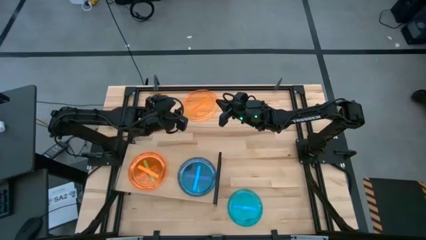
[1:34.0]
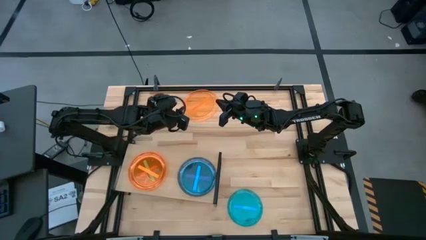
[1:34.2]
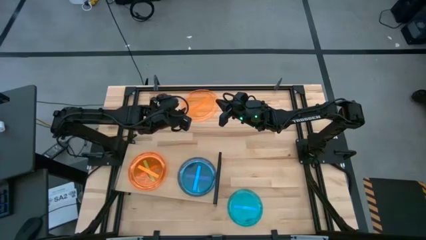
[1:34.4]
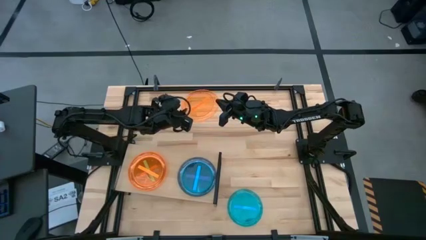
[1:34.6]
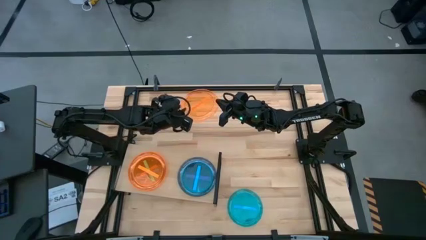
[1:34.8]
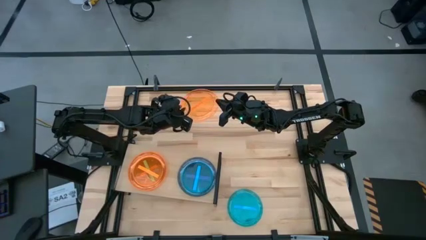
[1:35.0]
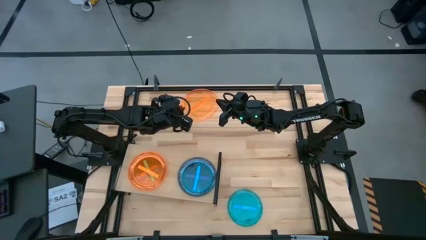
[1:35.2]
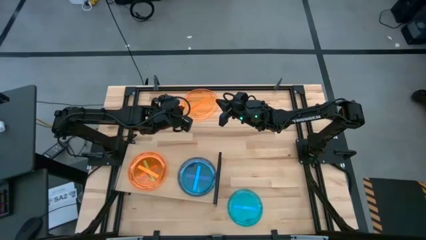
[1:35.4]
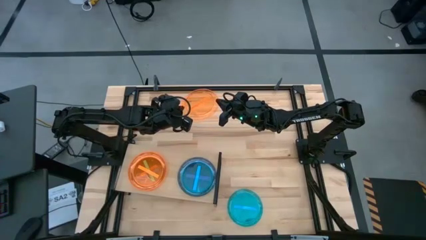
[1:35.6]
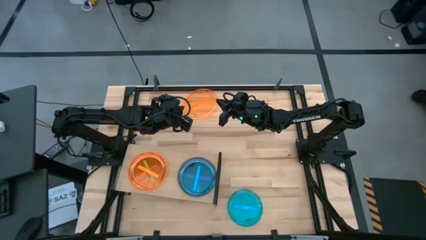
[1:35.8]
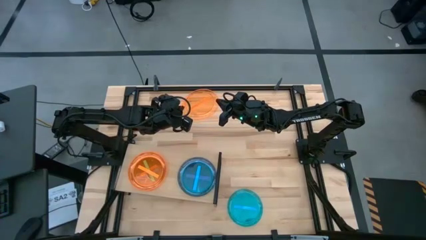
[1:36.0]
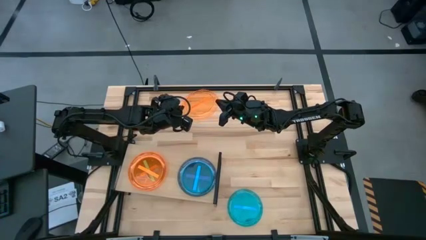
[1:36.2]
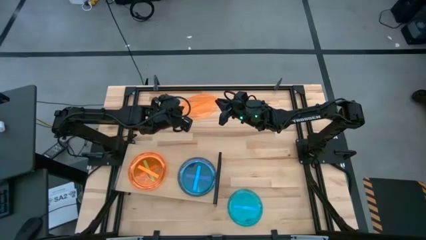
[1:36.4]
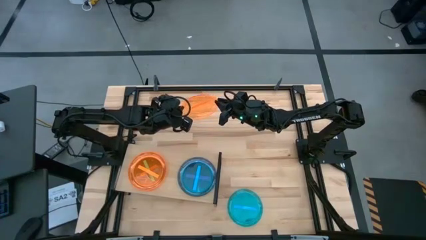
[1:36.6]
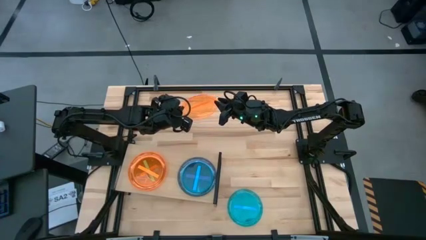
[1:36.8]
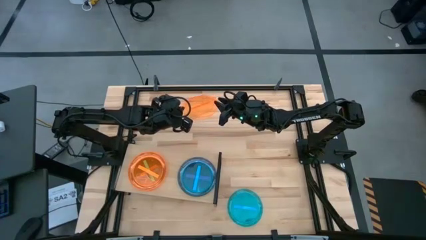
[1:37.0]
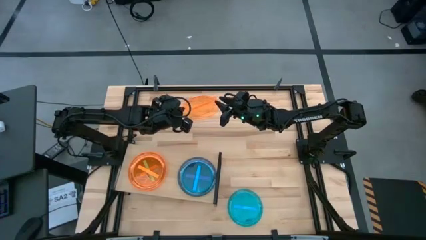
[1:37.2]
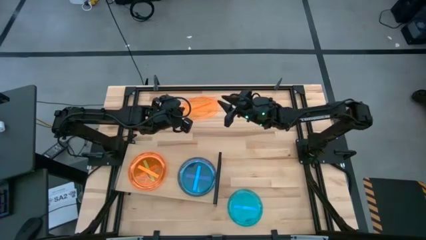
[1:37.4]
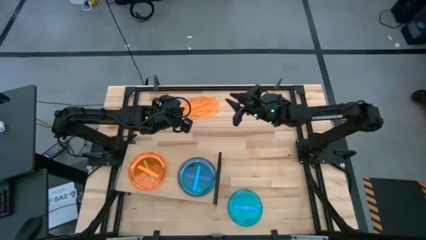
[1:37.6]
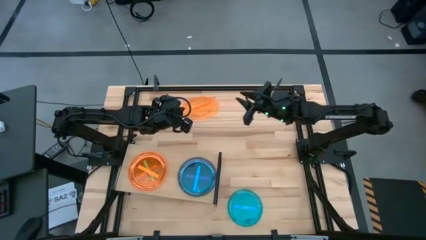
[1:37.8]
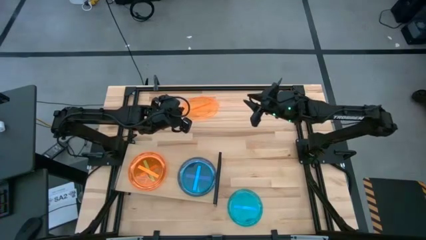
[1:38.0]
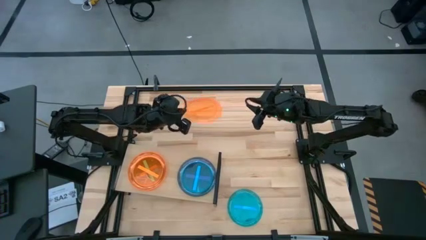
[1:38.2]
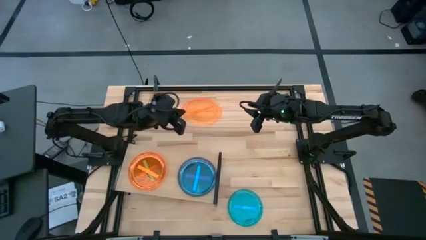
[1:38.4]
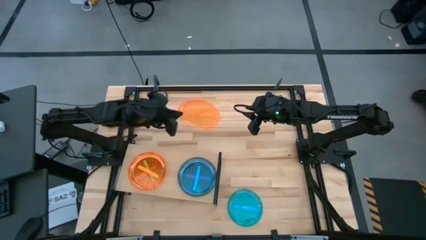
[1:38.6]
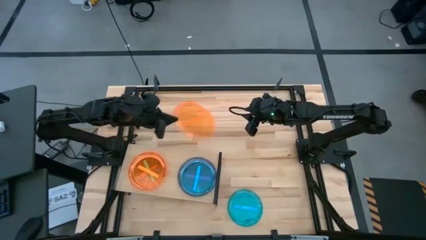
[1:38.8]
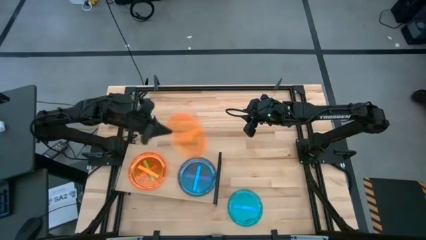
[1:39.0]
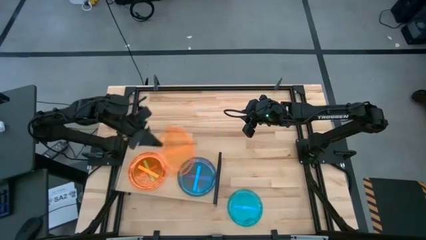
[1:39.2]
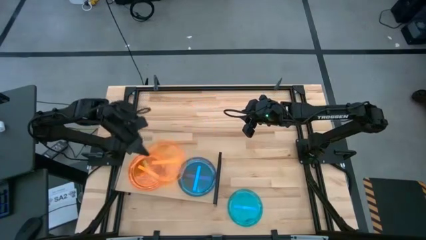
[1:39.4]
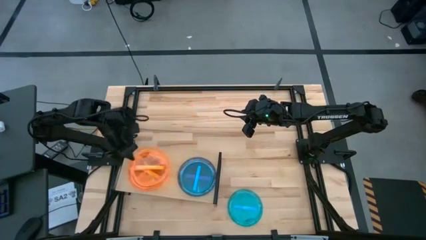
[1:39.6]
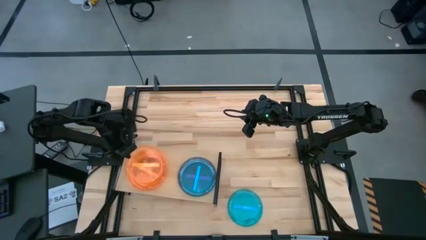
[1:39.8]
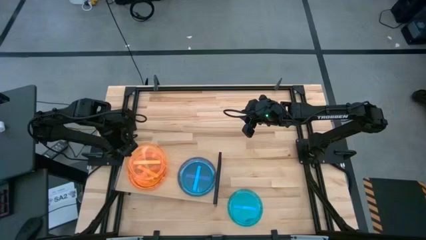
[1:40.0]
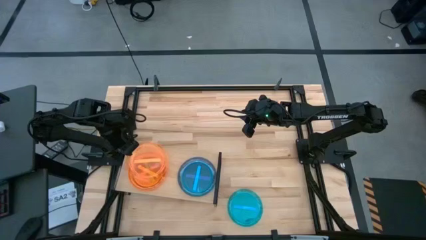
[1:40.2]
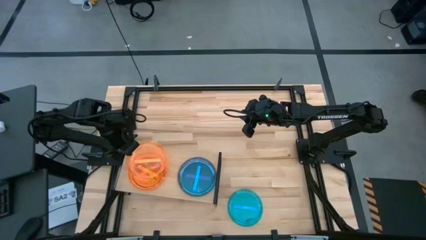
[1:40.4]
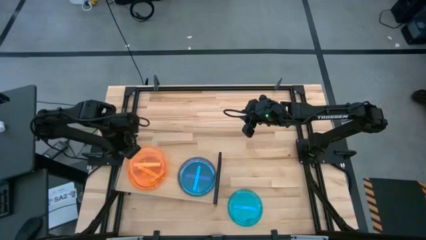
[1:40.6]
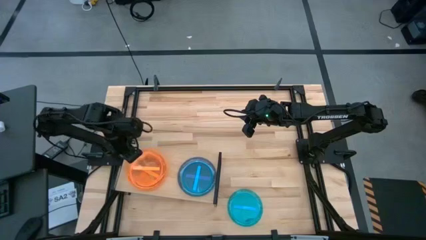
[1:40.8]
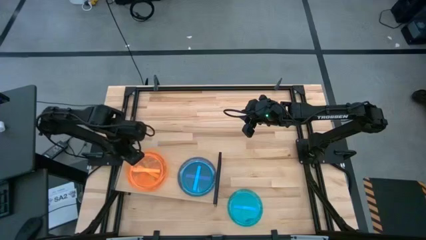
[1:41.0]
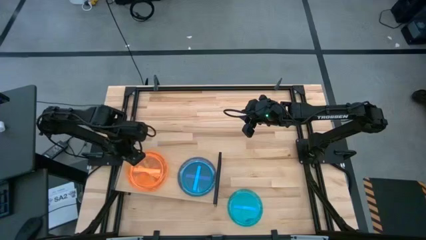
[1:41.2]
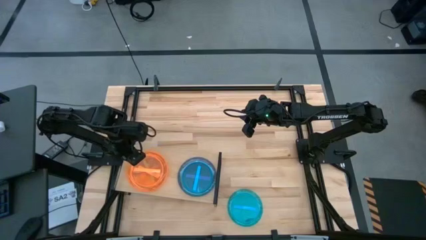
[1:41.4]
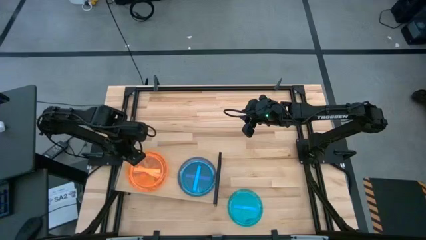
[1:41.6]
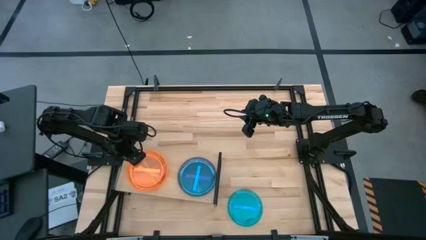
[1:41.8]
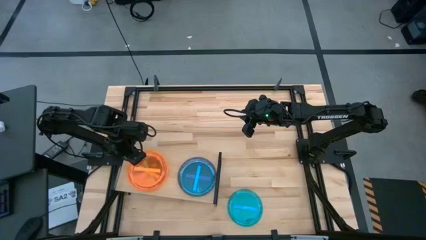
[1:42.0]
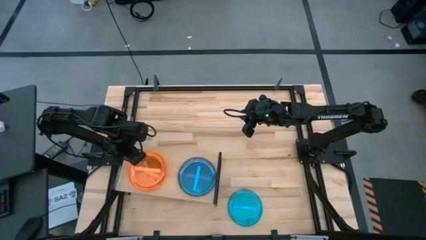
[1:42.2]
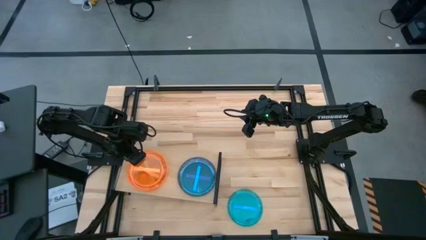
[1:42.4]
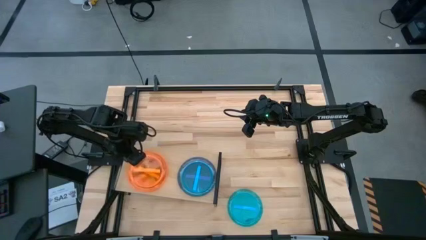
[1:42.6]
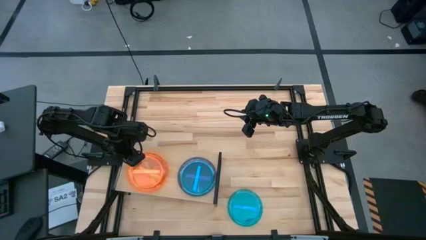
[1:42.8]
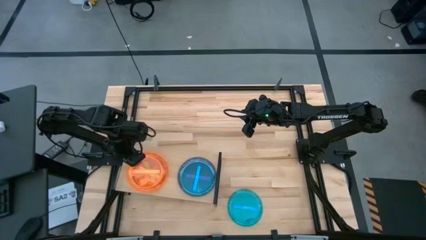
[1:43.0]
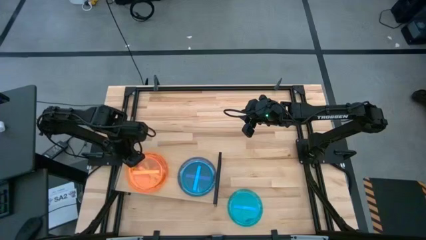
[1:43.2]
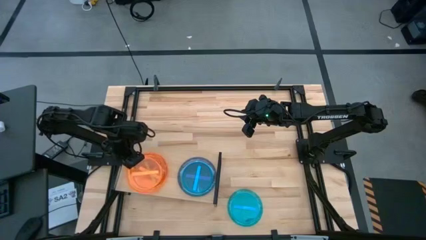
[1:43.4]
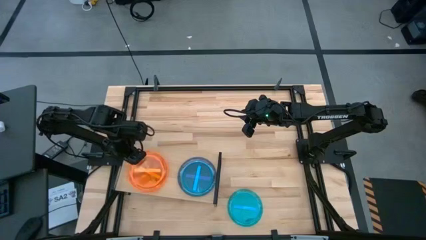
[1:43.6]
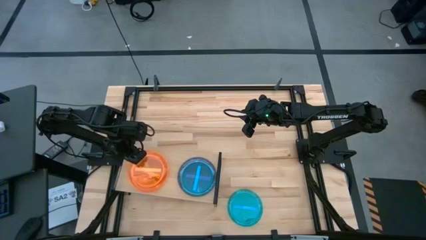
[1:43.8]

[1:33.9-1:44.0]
Task: Place and stack plates onto a shelf
Stack the orange plate on top of the other orange plate on the shelf

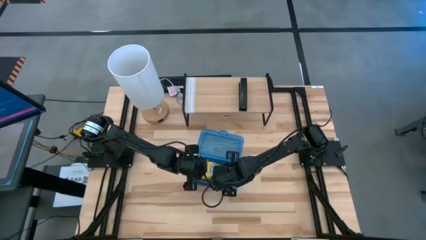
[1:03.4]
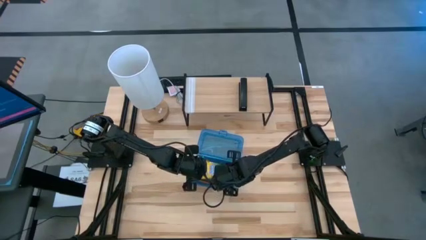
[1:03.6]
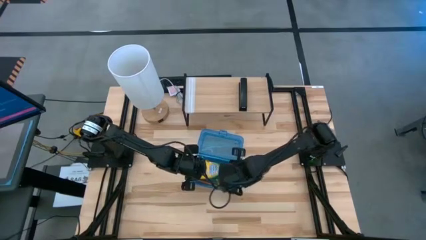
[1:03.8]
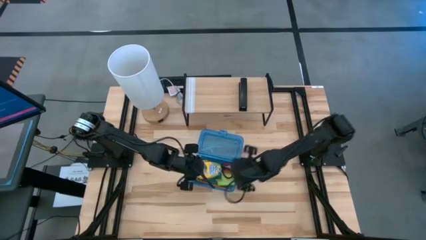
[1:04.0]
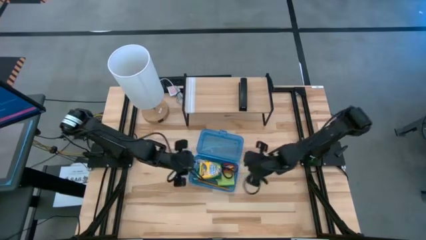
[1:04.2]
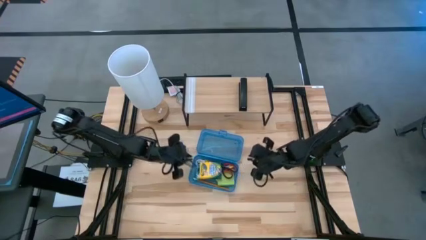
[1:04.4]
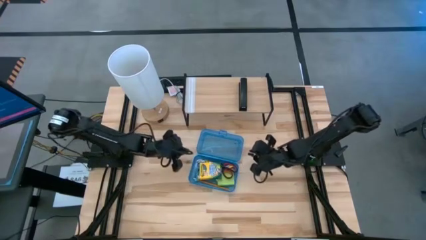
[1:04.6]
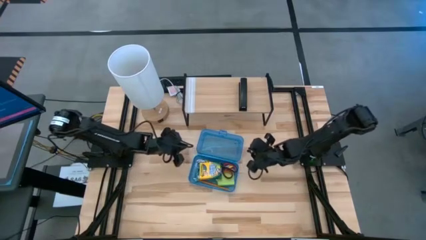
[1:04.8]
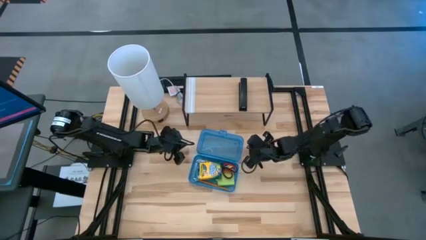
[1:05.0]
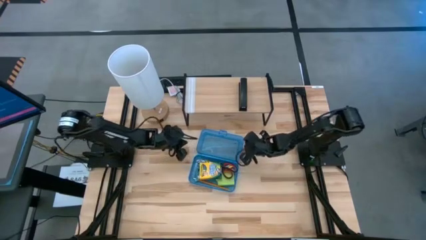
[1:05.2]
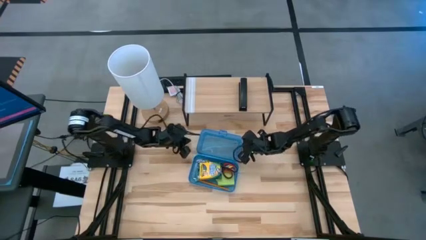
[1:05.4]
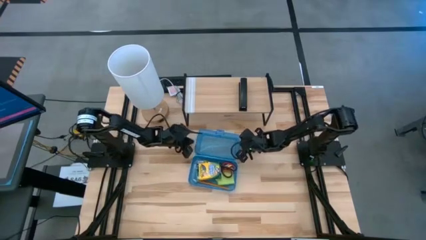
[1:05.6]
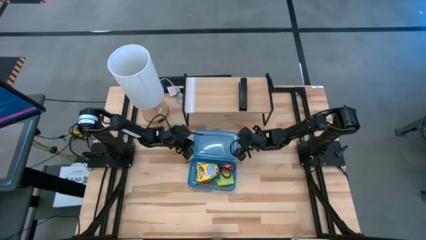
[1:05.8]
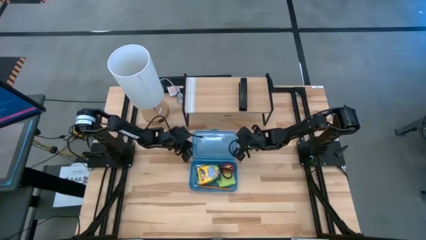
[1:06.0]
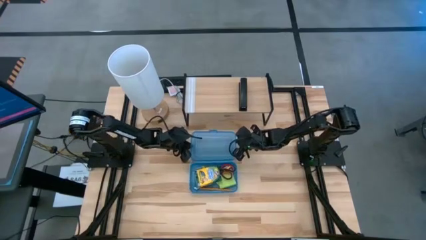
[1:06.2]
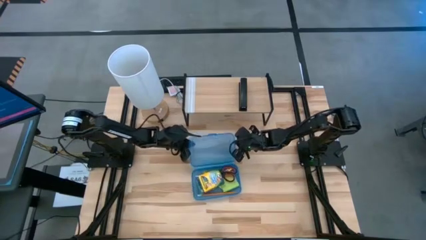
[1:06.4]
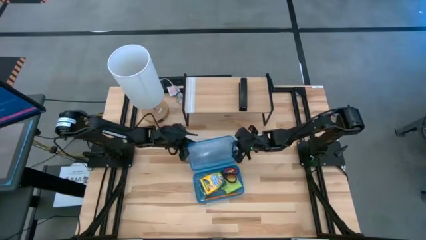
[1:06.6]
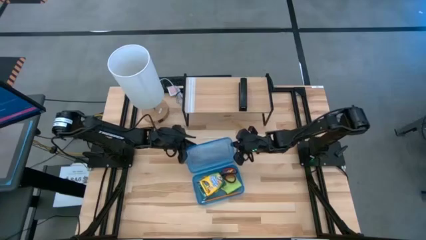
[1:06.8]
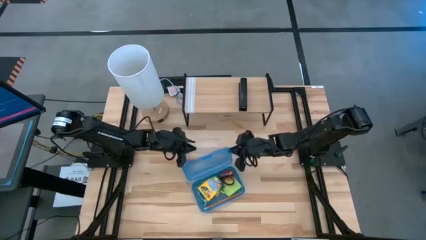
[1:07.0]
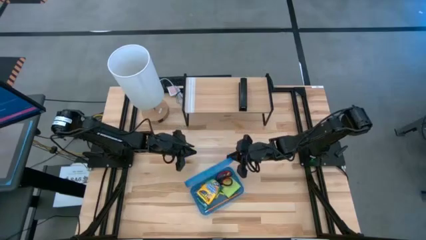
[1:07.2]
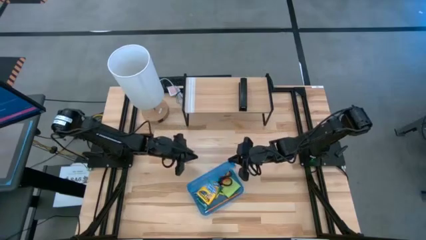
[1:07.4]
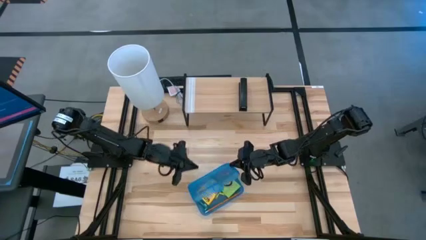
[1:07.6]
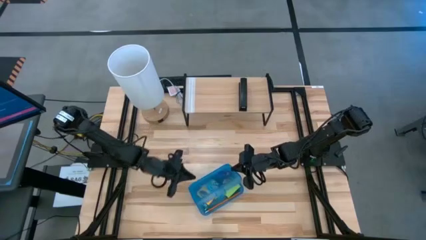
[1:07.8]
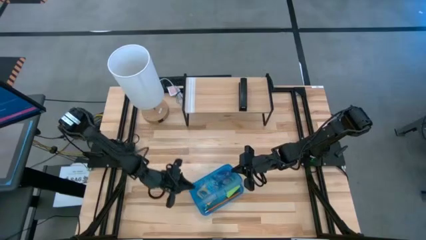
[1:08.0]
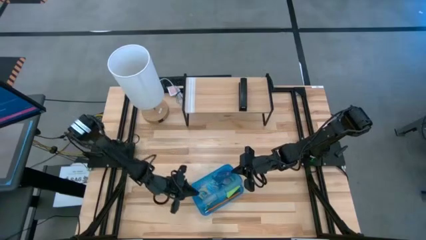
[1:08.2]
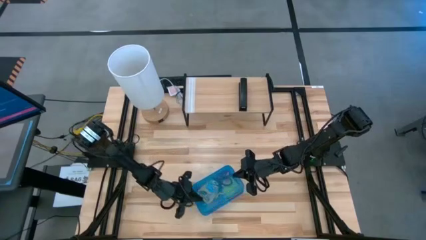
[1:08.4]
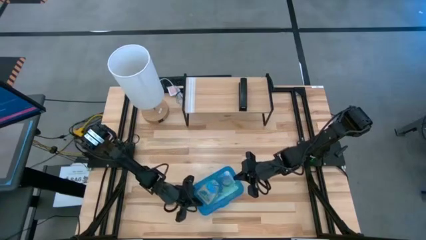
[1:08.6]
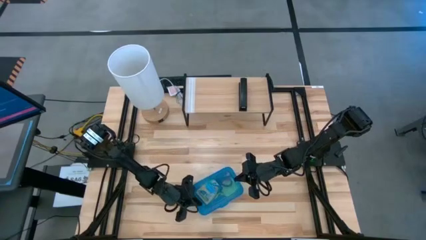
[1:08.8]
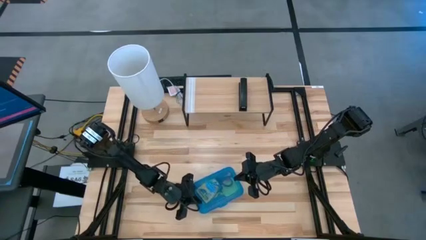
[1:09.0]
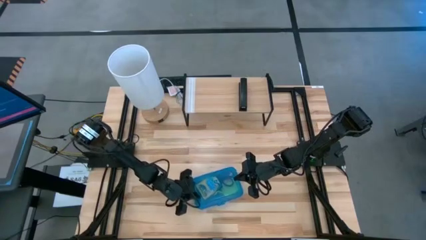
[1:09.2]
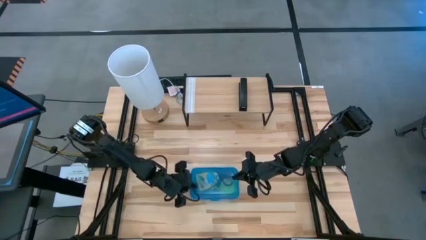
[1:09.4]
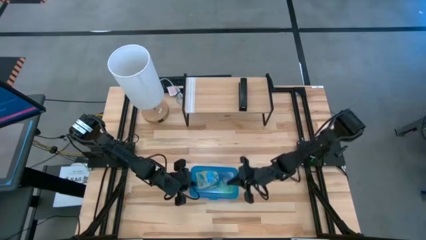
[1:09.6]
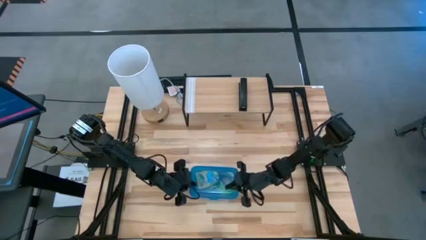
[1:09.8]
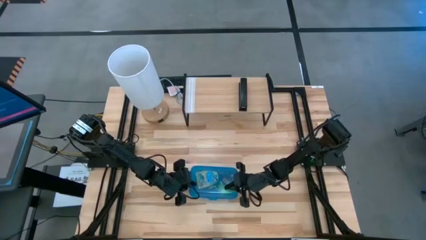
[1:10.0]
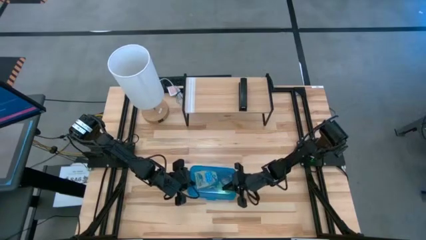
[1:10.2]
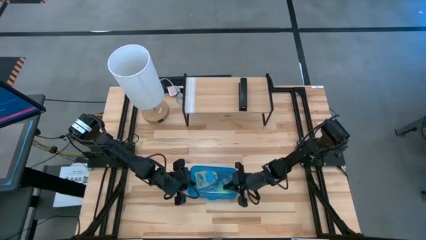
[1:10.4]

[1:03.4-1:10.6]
Task: Pack school essentials
Close the blue supply box
